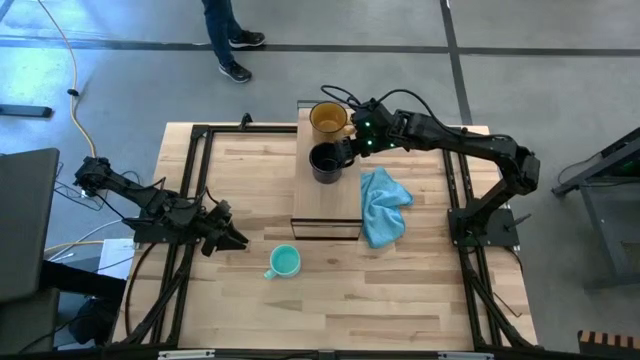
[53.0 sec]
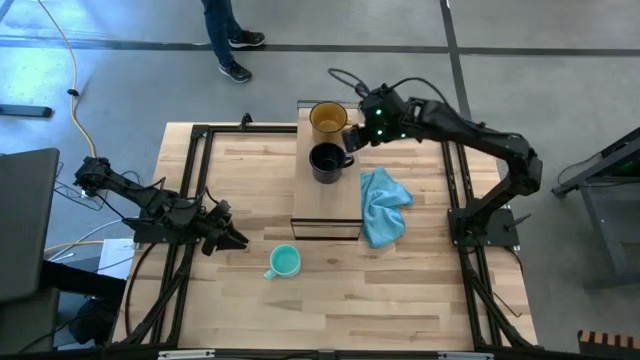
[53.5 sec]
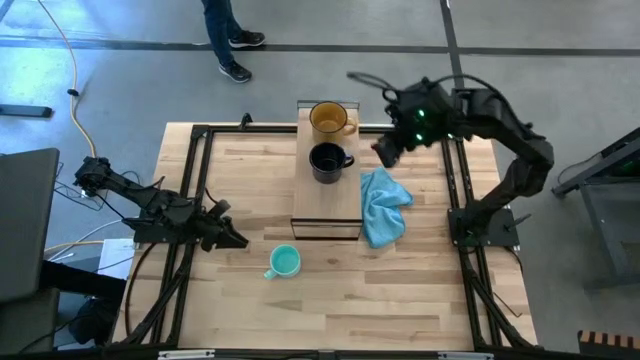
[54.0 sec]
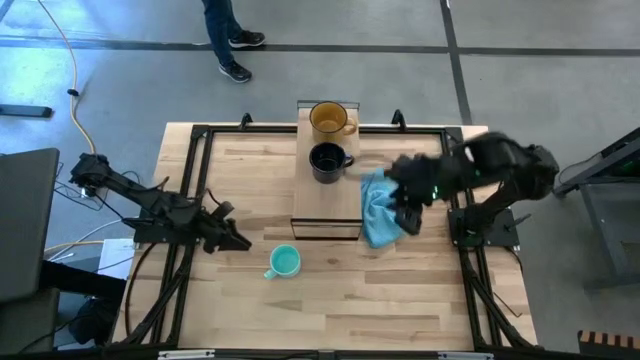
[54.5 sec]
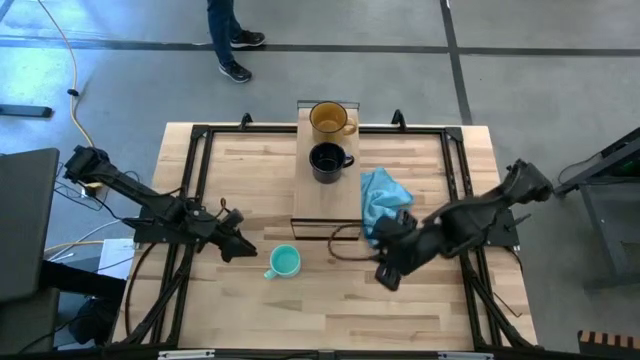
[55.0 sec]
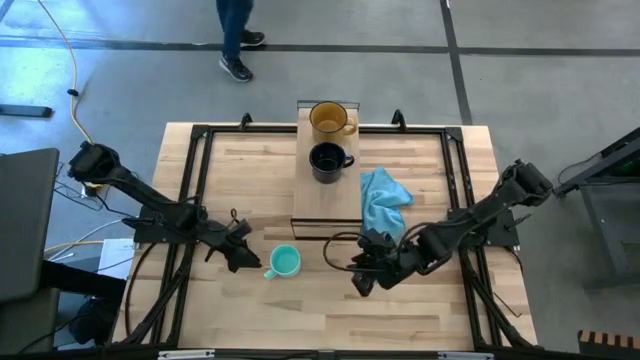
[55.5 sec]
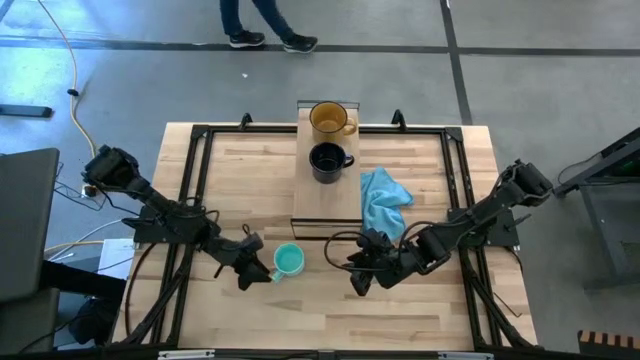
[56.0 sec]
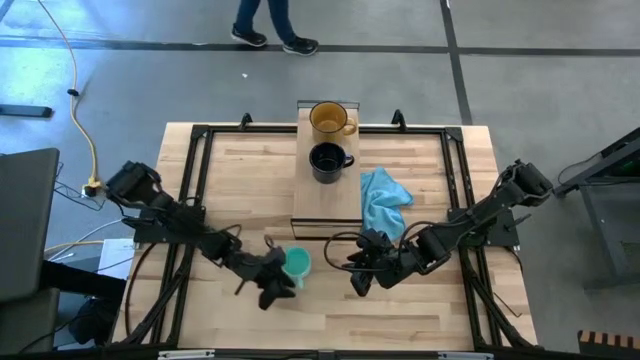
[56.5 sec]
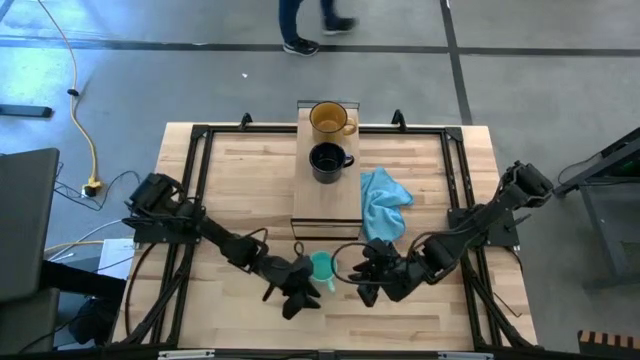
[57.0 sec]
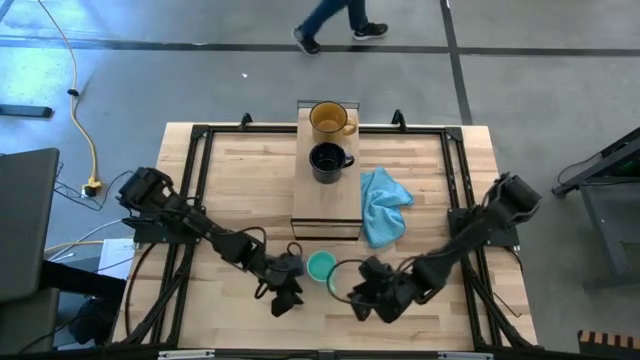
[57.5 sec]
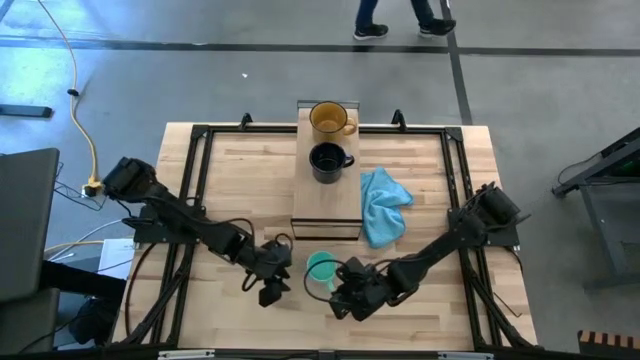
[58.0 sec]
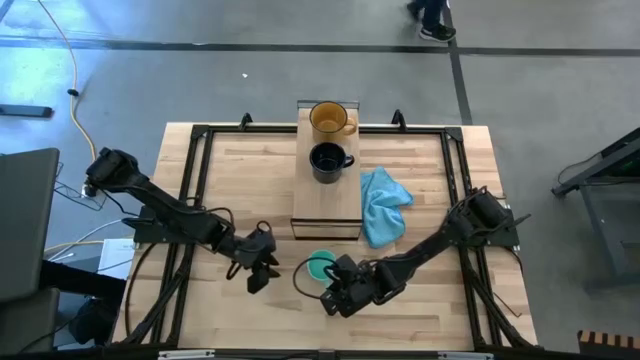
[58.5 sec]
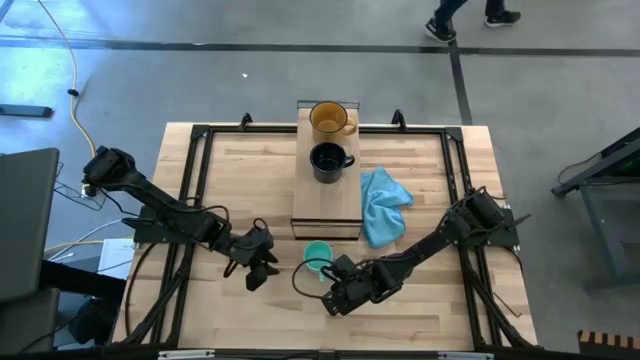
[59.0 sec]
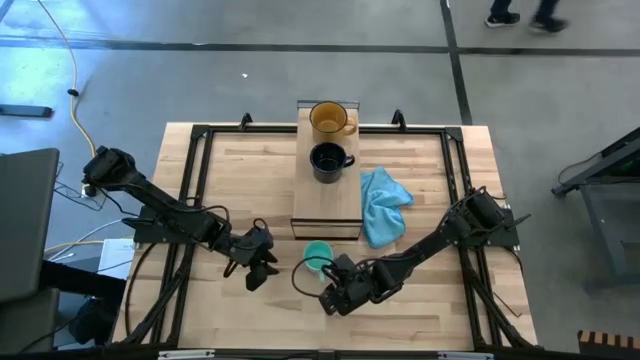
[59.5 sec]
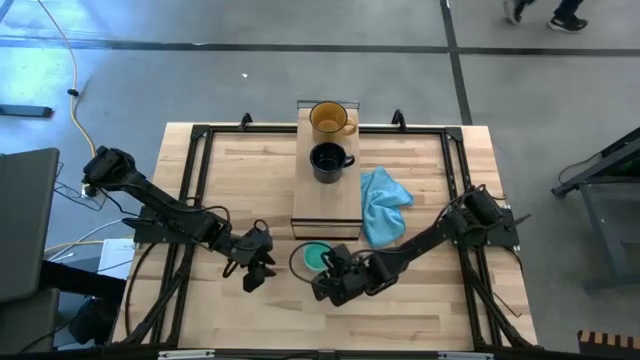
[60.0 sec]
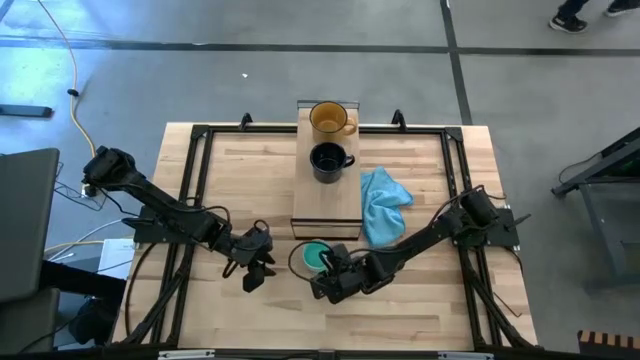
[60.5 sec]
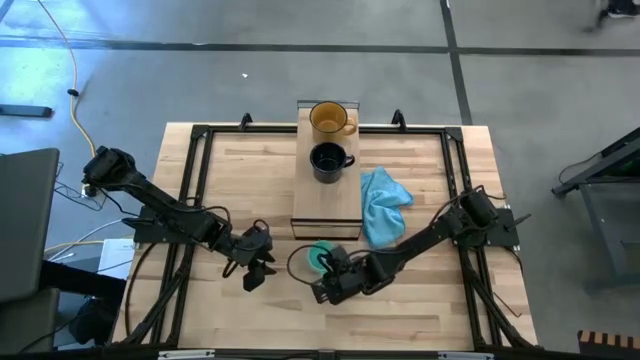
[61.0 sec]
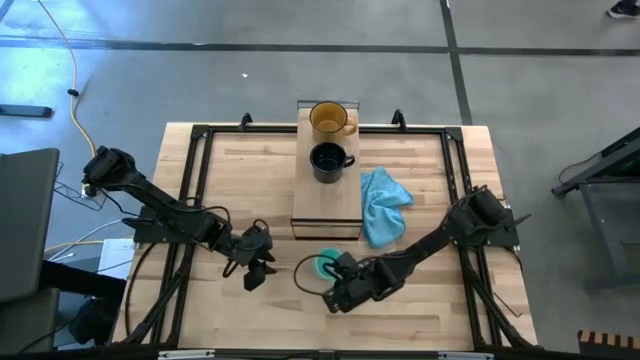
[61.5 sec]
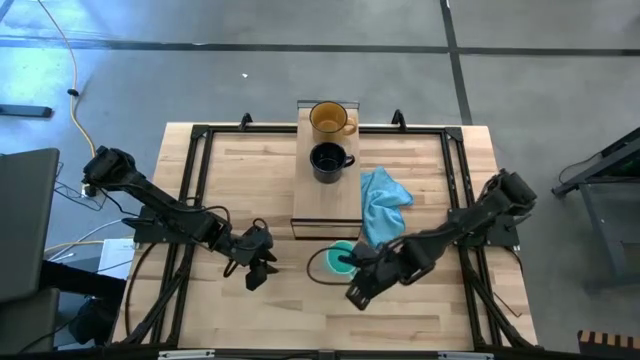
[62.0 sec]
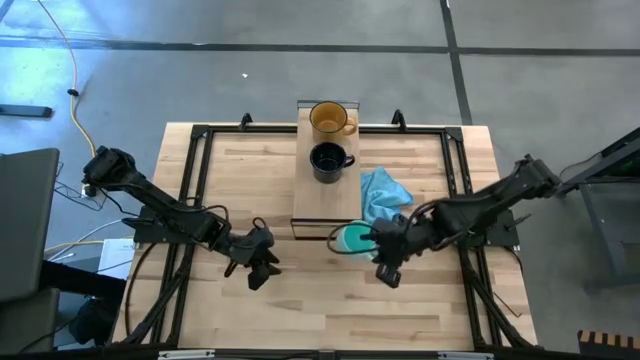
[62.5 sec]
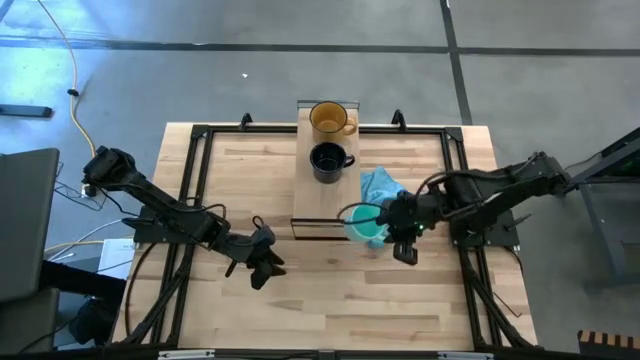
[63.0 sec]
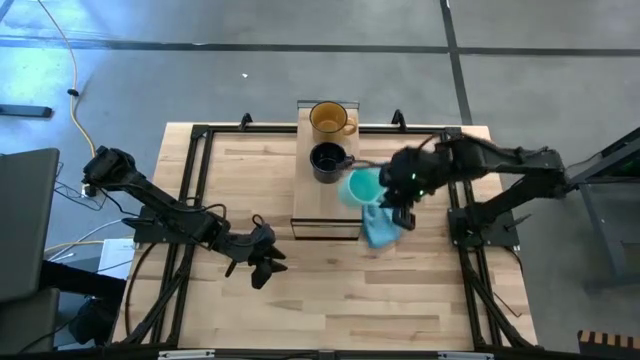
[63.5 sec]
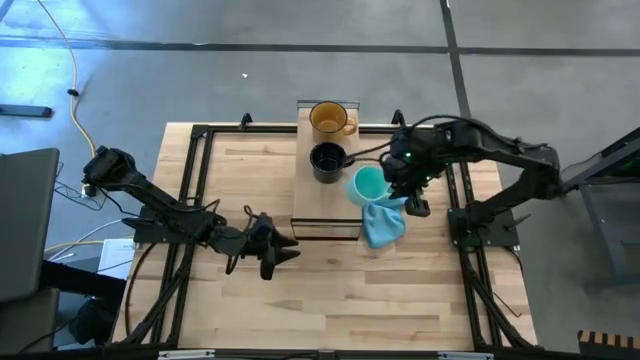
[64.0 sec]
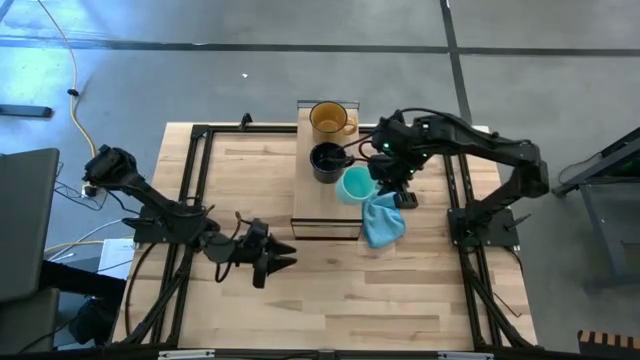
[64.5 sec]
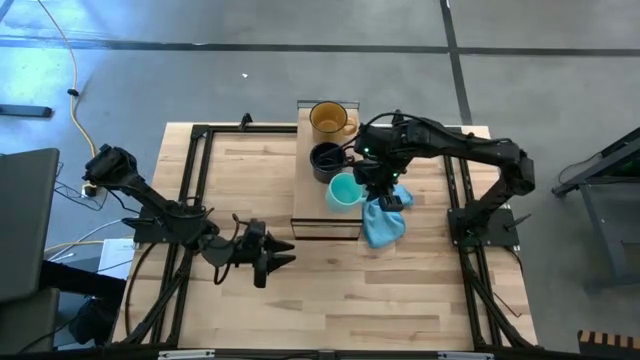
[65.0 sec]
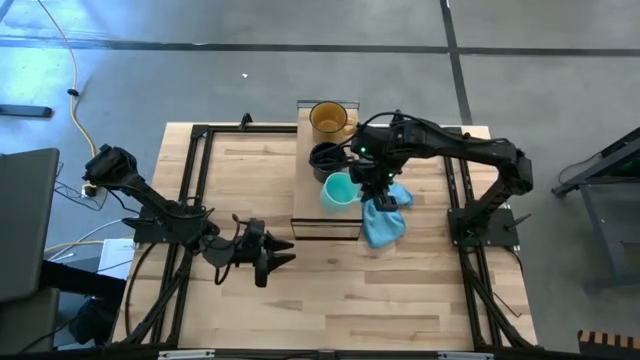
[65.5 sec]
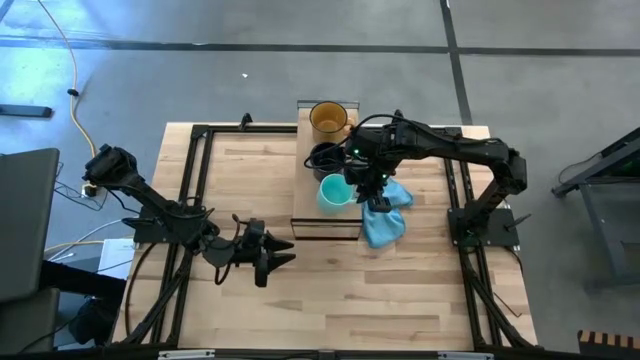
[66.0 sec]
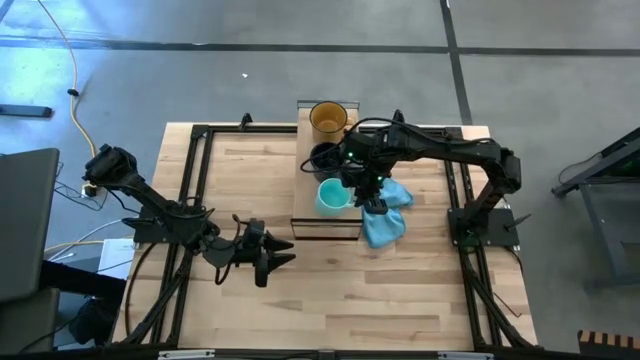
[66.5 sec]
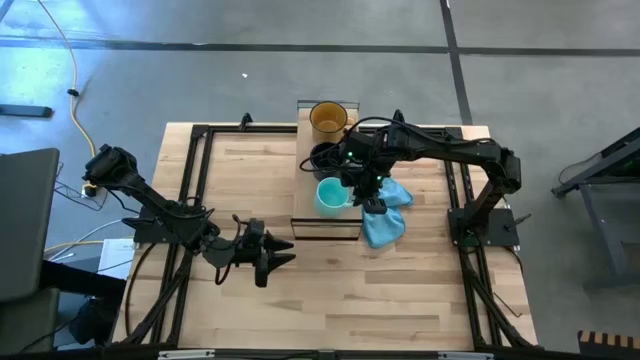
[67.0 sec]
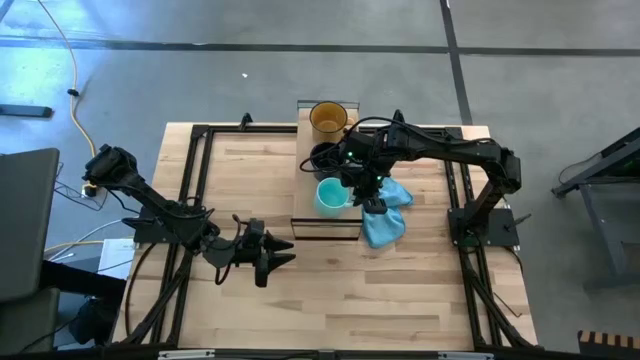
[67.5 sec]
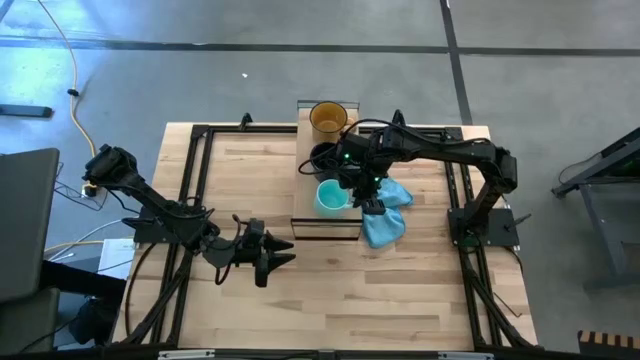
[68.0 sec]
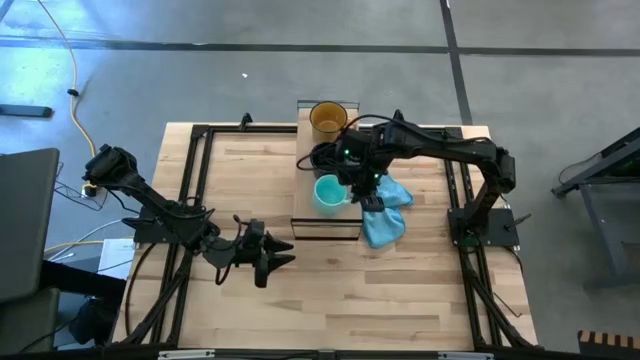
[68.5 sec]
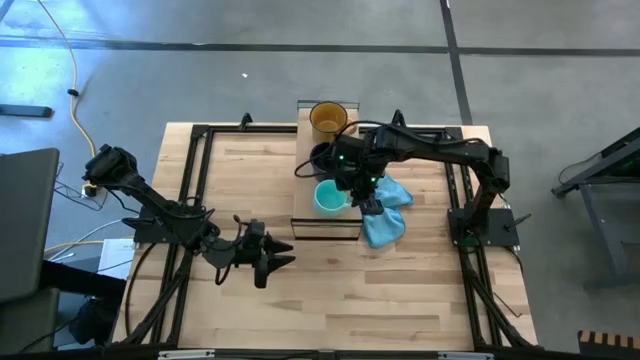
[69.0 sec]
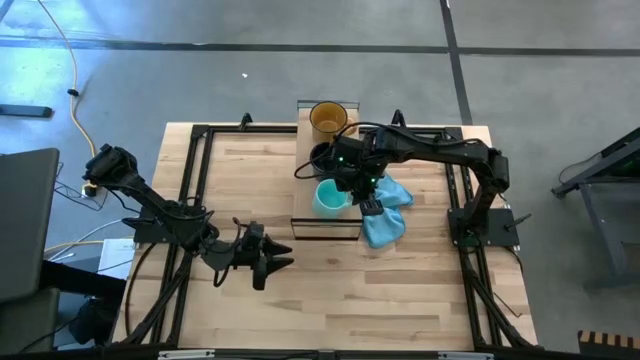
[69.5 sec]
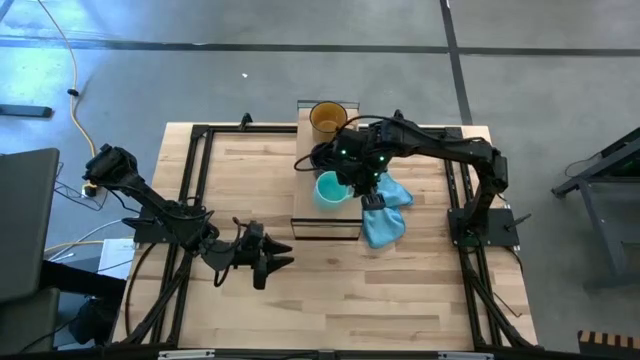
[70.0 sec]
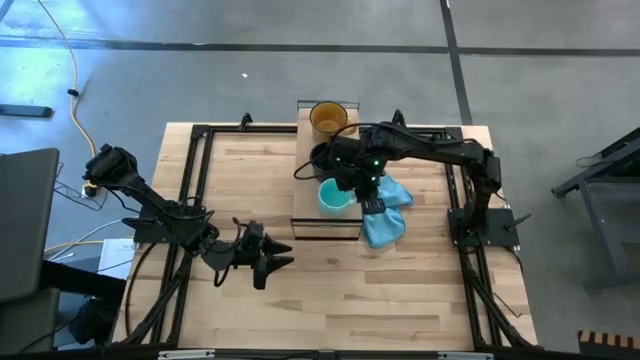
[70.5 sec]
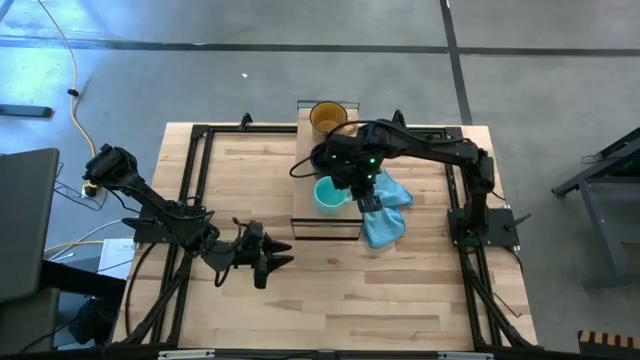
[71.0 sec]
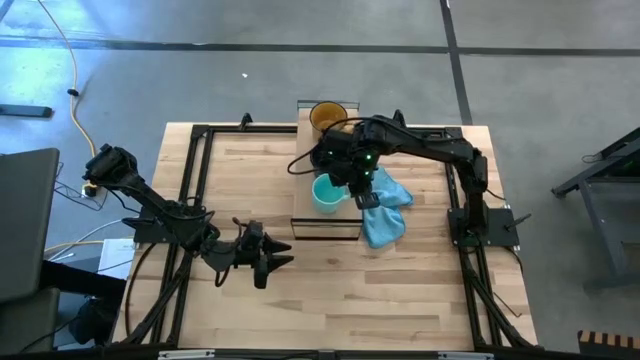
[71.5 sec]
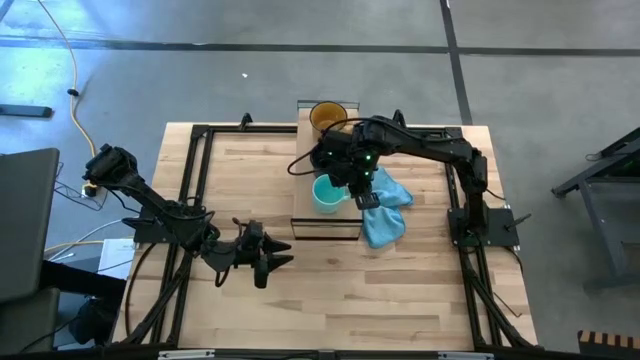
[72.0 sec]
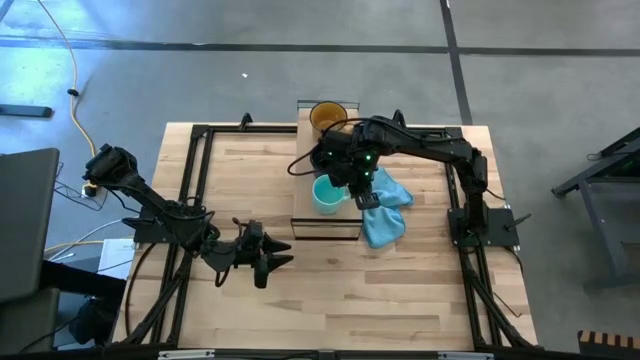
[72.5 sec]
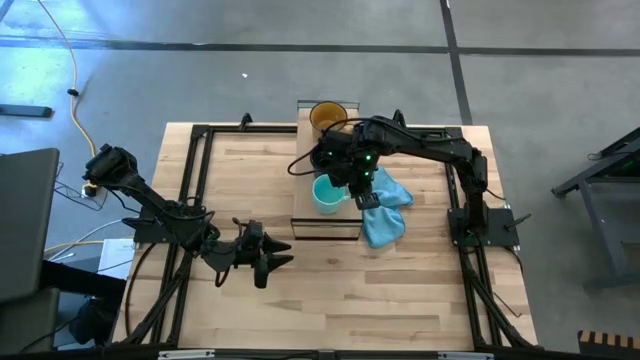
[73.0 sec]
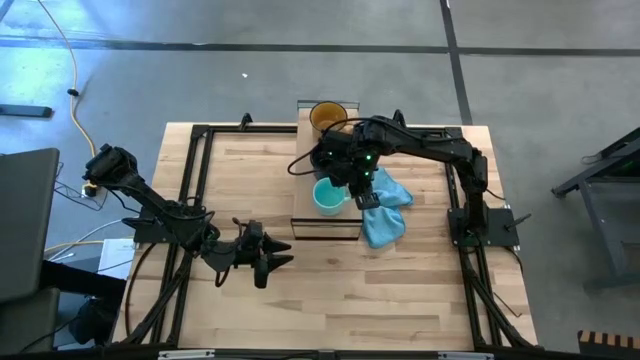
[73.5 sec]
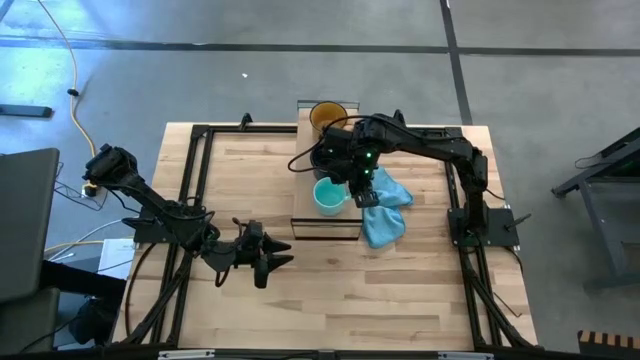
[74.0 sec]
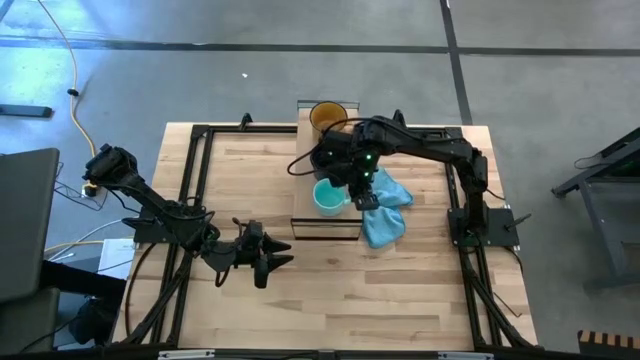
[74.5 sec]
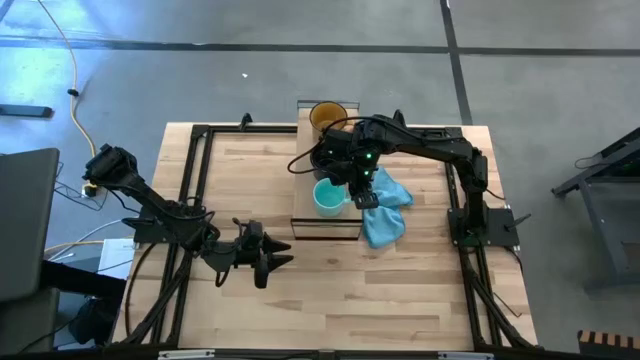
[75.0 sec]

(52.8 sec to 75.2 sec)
Task: Stack small to large cups/mugs on shelf
Put the light blue mug on the shelf
